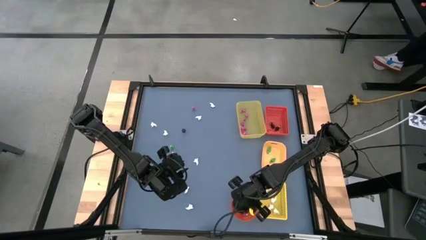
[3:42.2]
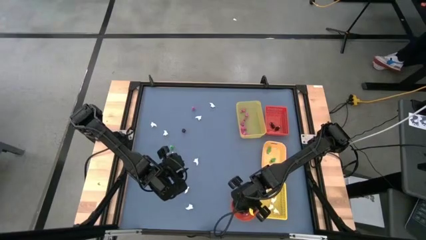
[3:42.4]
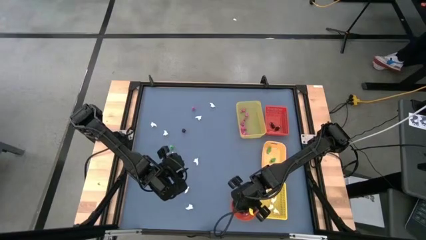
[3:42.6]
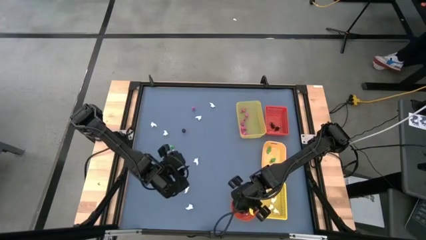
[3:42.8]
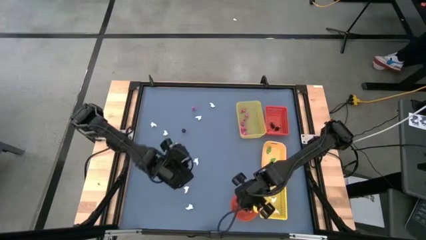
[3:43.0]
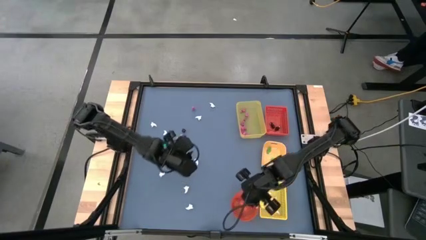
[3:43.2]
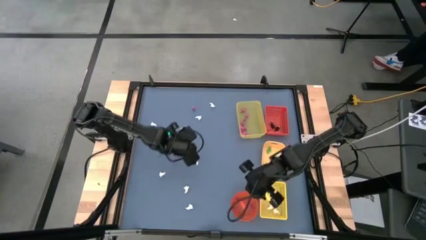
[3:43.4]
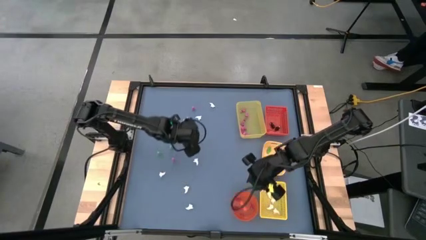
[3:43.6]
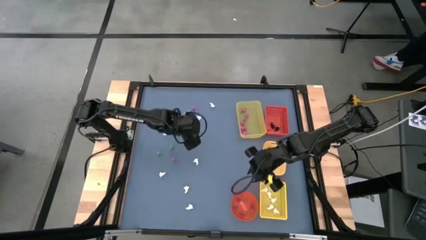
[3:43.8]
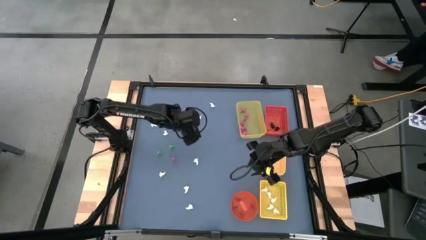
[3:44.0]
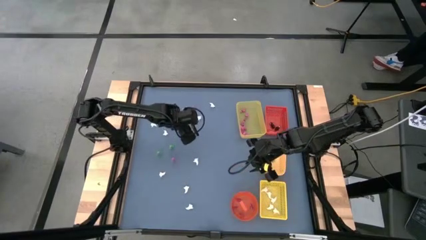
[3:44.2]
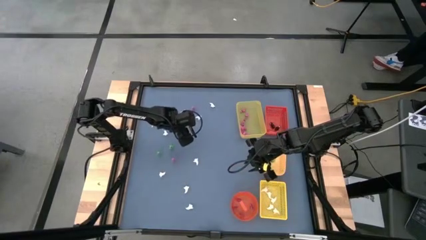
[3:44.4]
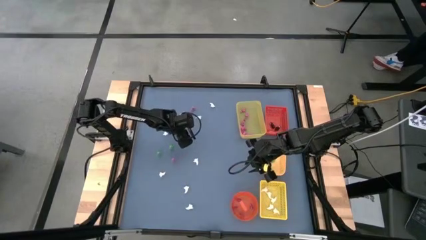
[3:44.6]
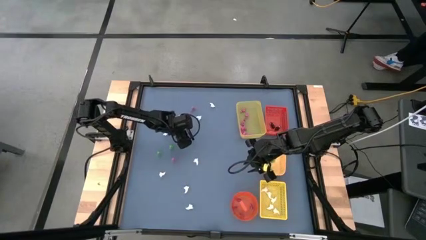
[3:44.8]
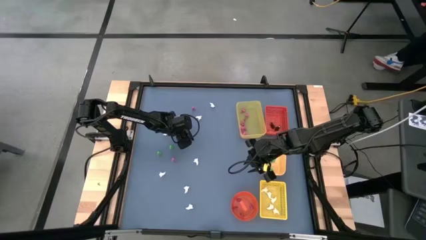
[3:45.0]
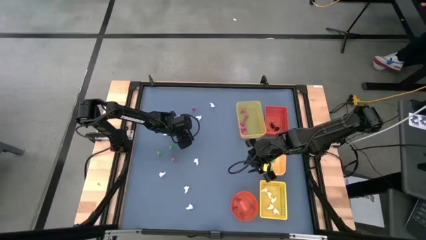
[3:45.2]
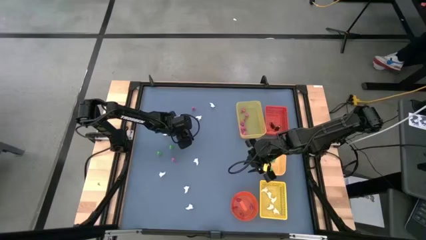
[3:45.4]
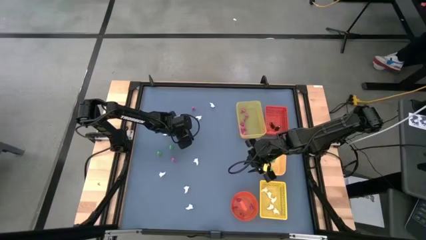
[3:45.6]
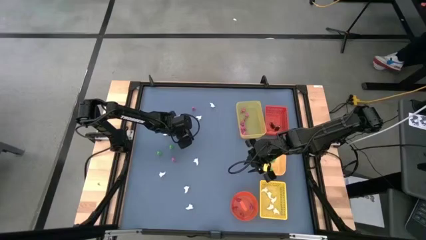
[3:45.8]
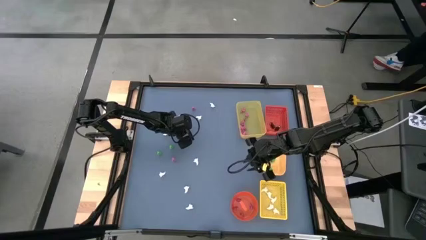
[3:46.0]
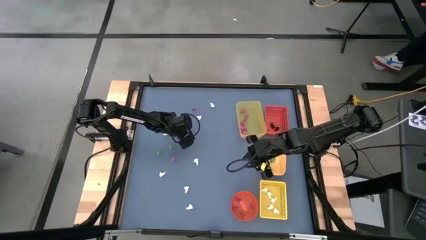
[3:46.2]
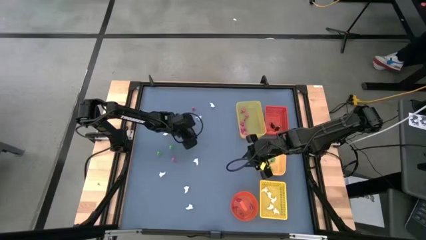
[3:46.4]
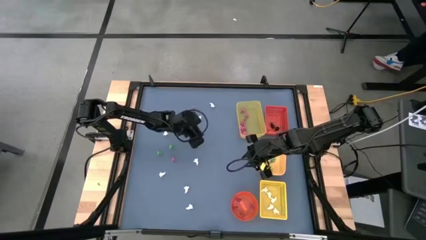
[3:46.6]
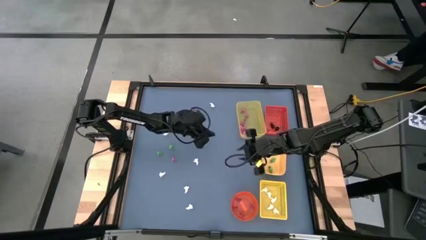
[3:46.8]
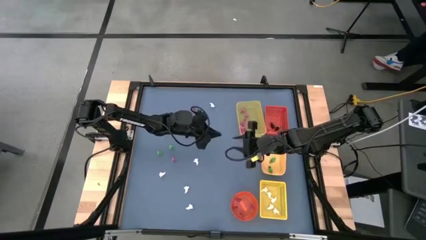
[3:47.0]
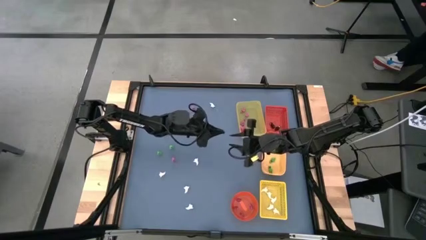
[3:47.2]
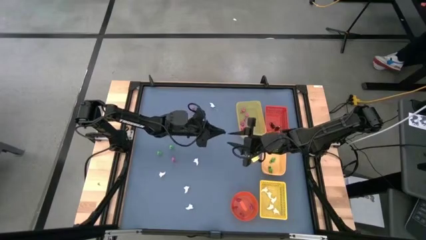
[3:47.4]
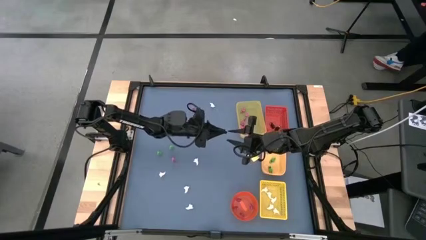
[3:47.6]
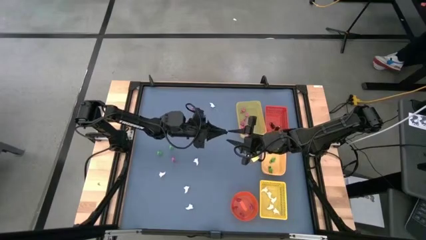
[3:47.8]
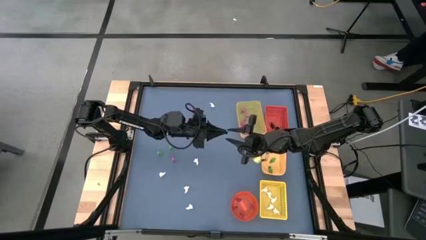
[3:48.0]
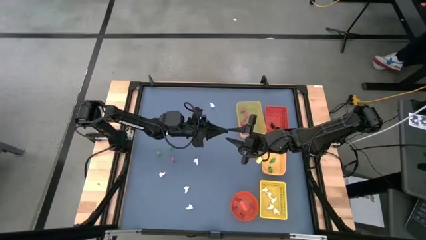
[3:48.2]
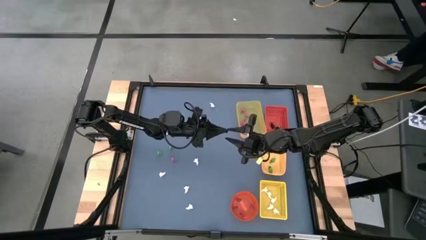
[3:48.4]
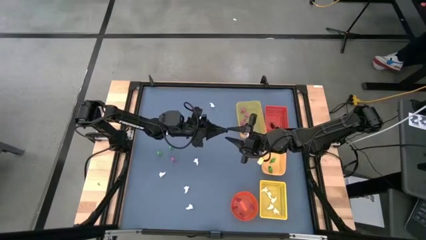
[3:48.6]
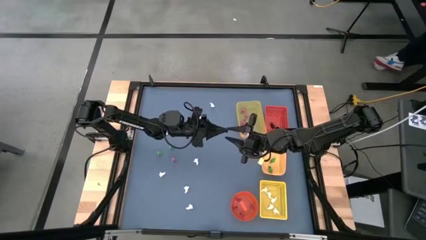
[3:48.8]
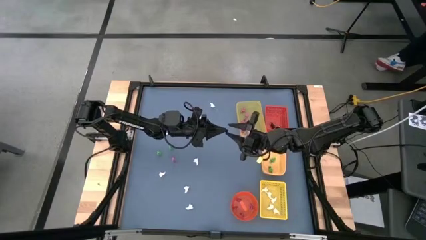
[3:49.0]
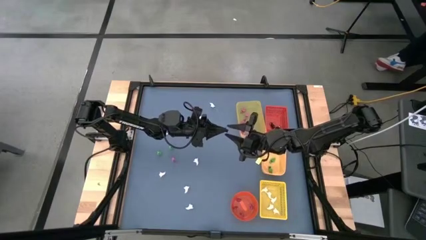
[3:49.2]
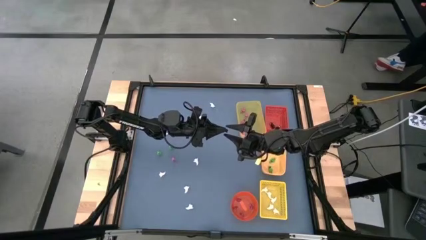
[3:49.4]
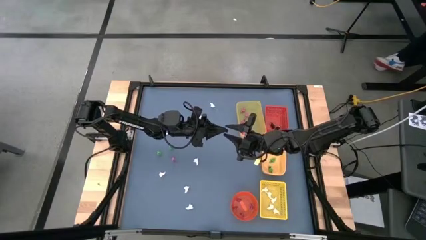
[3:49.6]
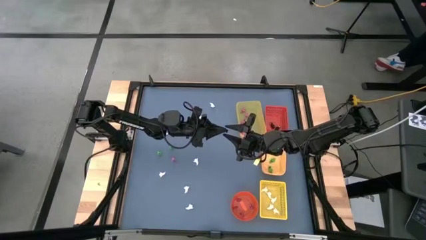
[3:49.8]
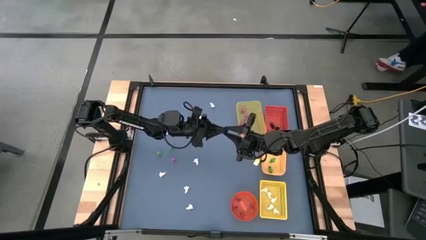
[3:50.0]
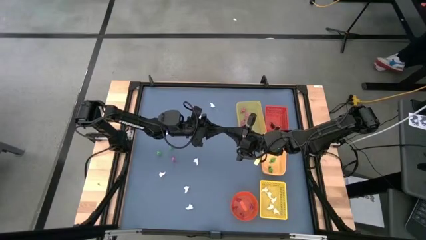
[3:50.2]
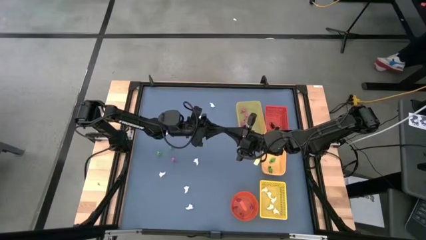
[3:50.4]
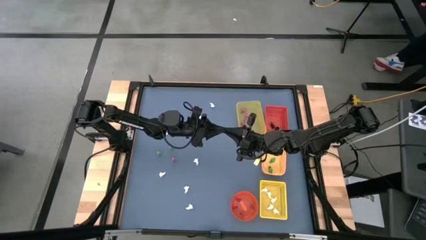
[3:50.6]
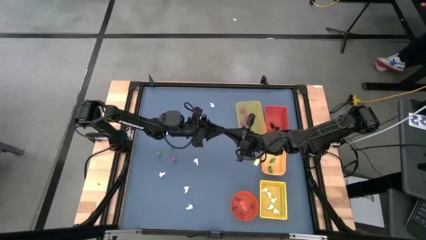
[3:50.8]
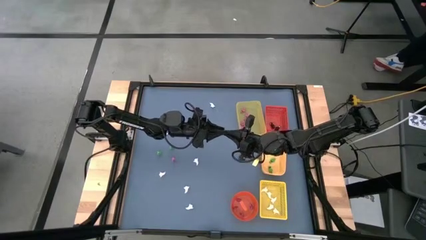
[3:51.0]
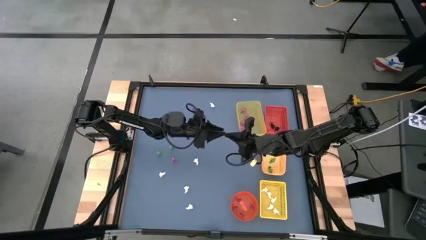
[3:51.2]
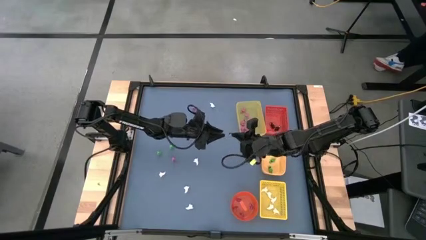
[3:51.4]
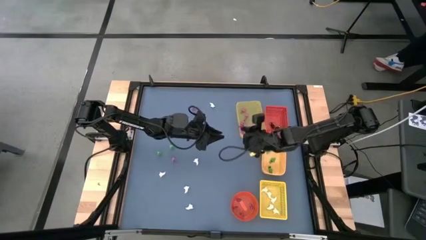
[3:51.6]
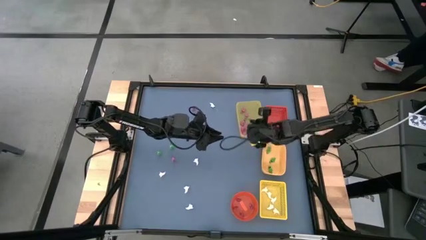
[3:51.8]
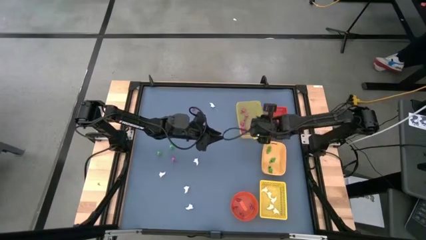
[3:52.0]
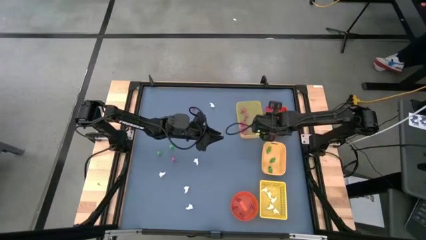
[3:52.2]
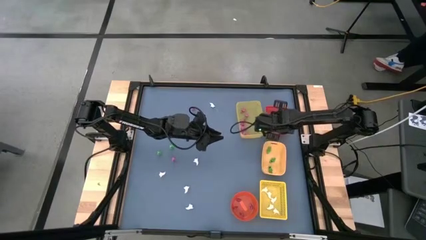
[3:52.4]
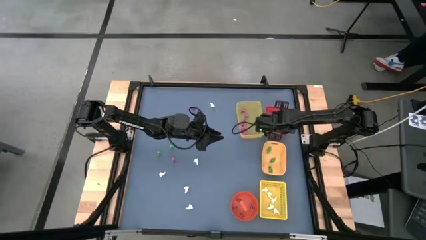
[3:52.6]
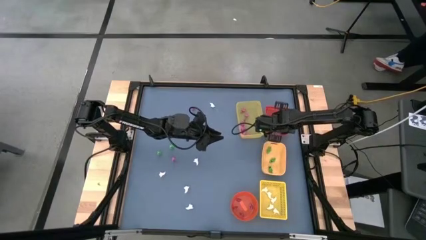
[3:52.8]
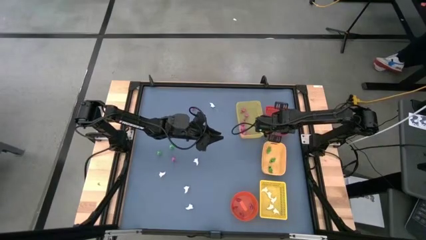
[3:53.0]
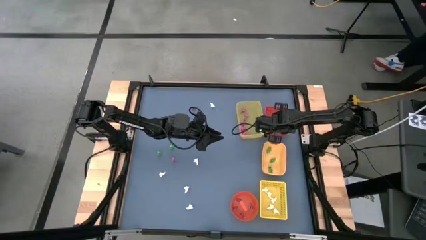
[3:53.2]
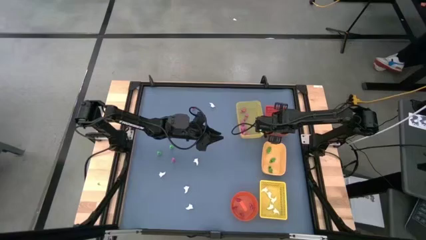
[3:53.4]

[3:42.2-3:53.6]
Task: Sort Halloween decoration
Put the black skeleton toy into the red bin
